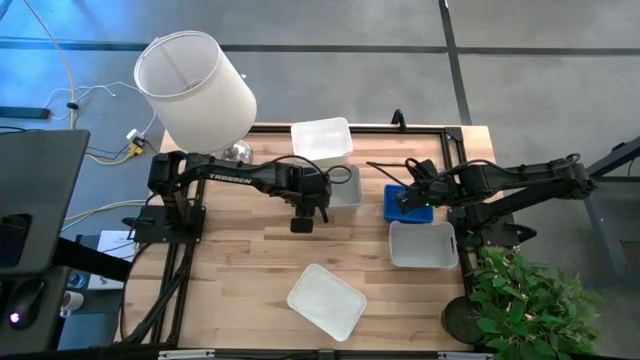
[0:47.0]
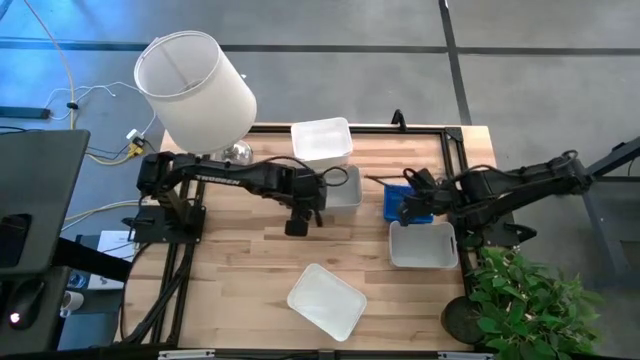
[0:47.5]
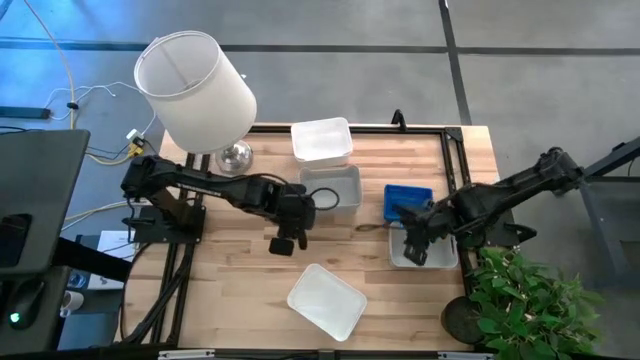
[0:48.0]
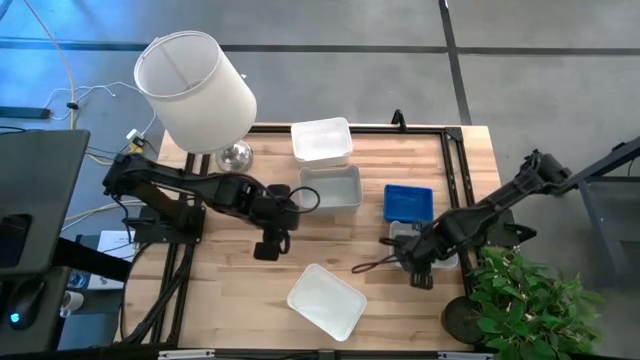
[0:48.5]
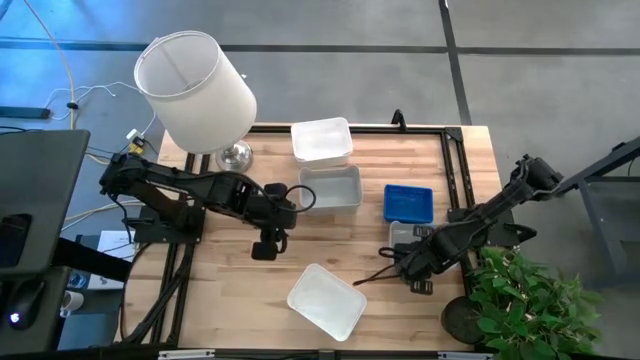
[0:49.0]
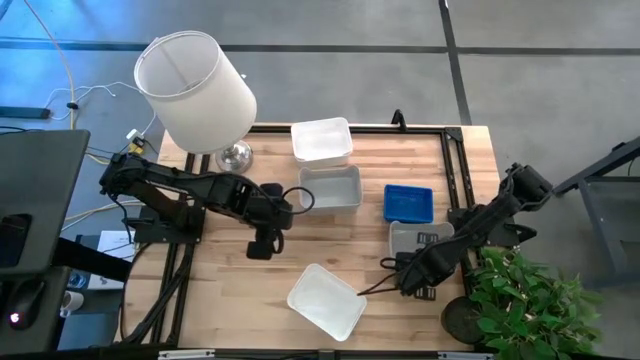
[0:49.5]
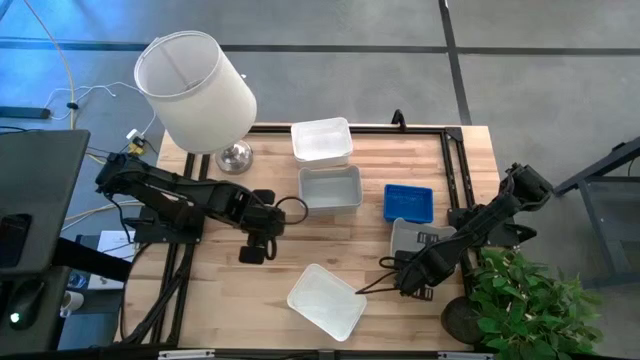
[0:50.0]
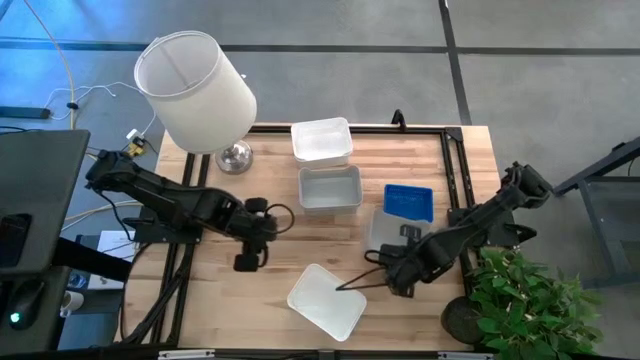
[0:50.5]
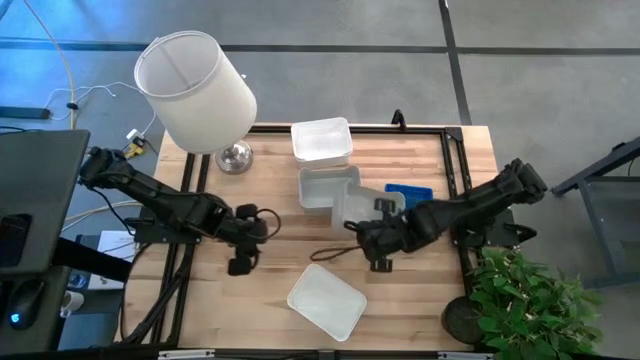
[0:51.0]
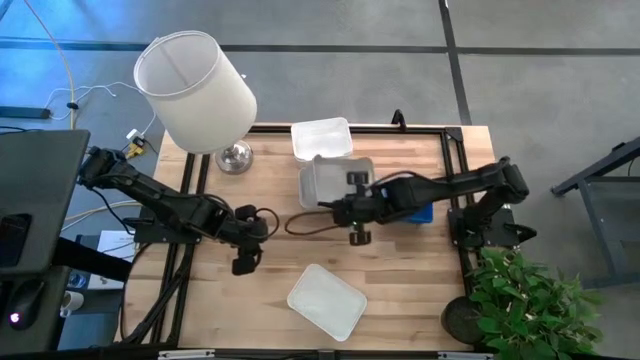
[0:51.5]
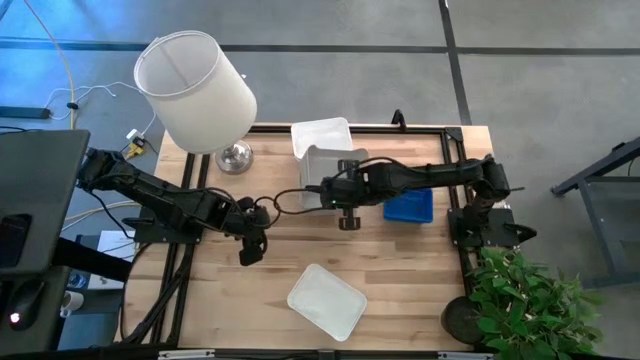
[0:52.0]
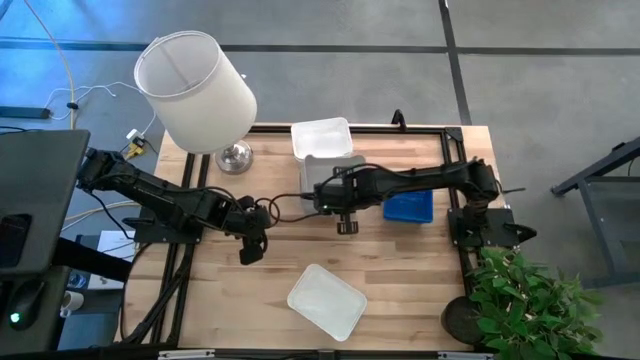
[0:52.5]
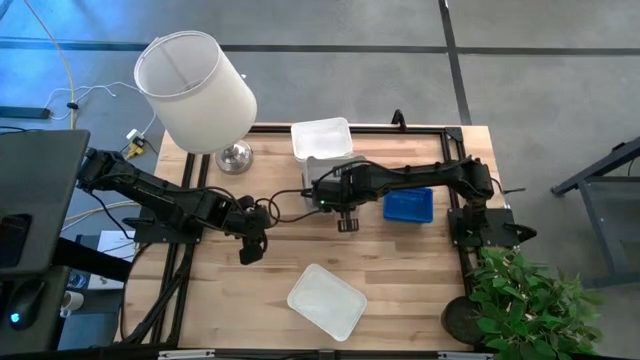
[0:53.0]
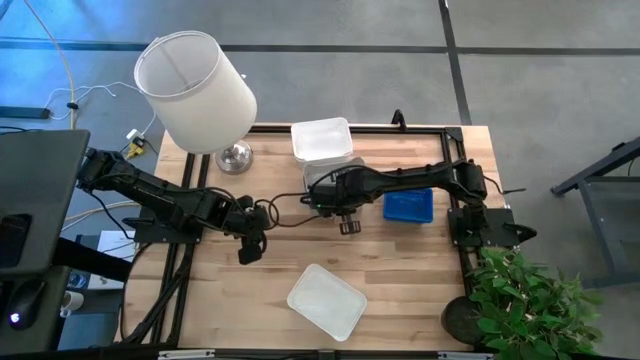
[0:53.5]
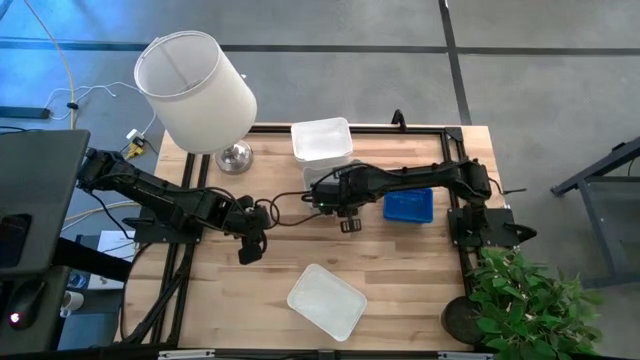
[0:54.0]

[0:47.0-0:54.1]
Stack the bottom gray bin into the top gray bin

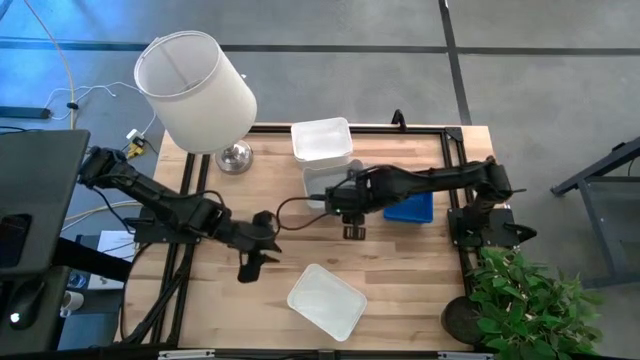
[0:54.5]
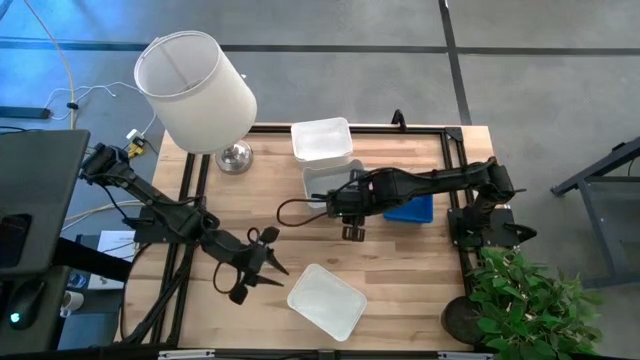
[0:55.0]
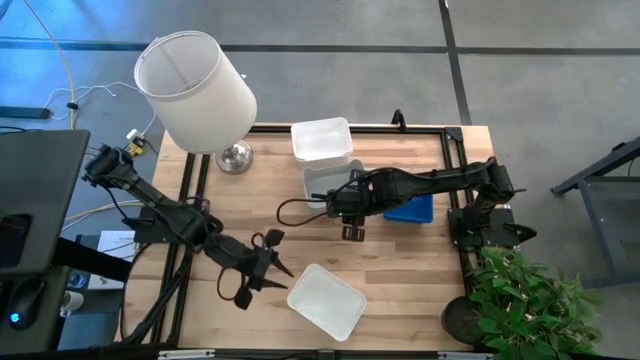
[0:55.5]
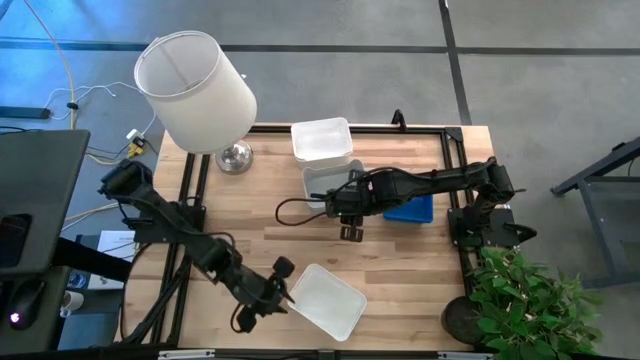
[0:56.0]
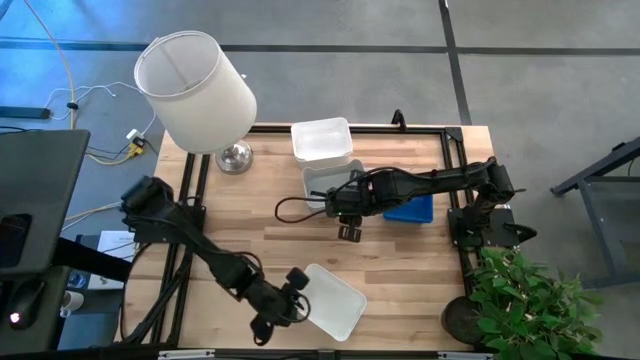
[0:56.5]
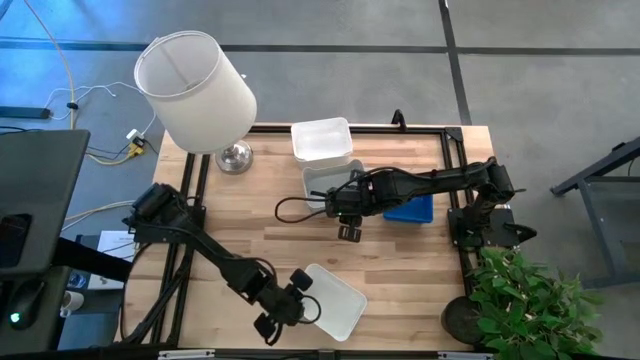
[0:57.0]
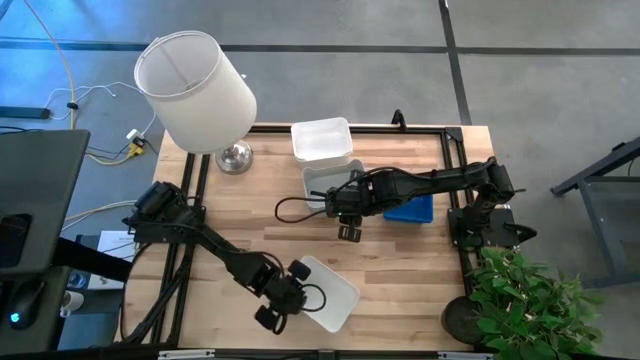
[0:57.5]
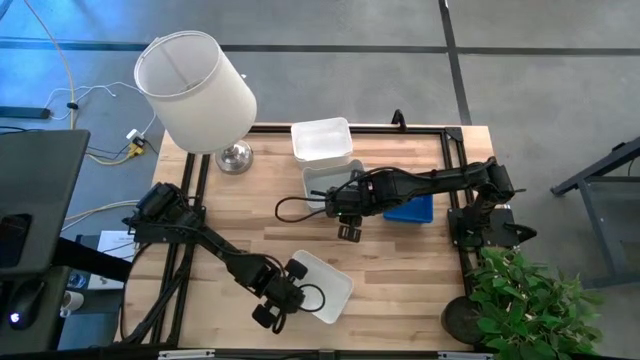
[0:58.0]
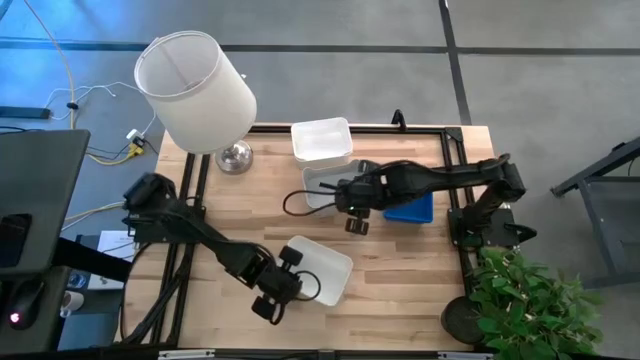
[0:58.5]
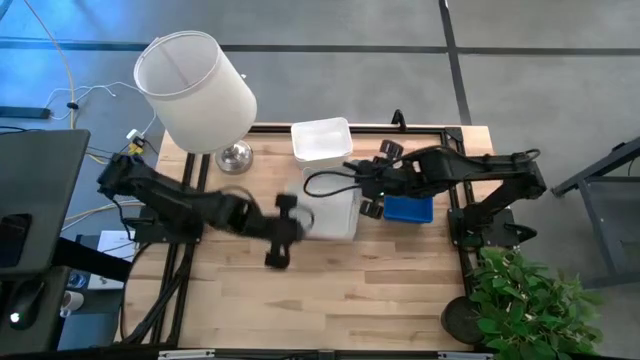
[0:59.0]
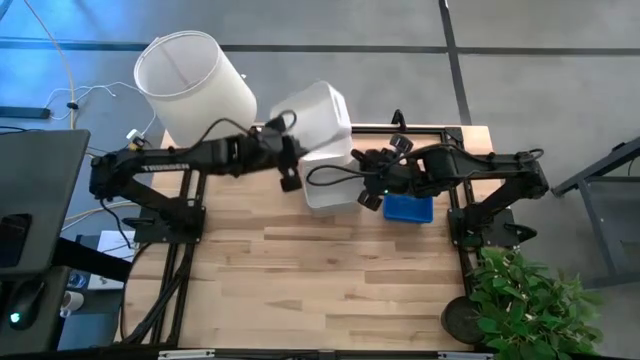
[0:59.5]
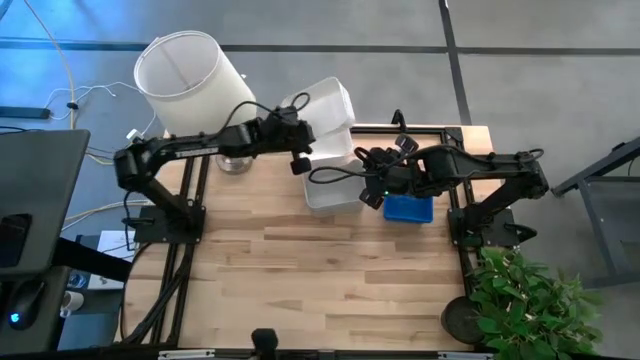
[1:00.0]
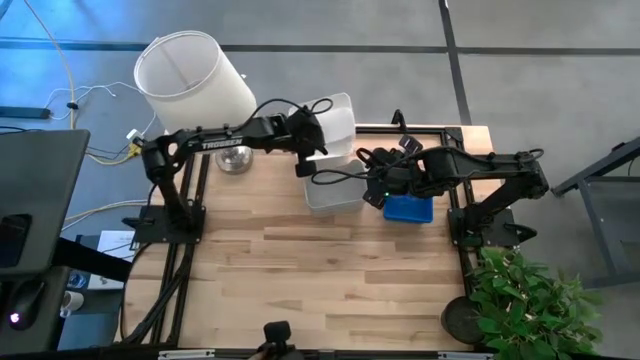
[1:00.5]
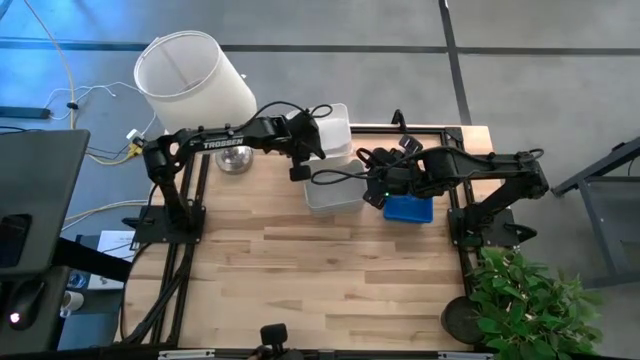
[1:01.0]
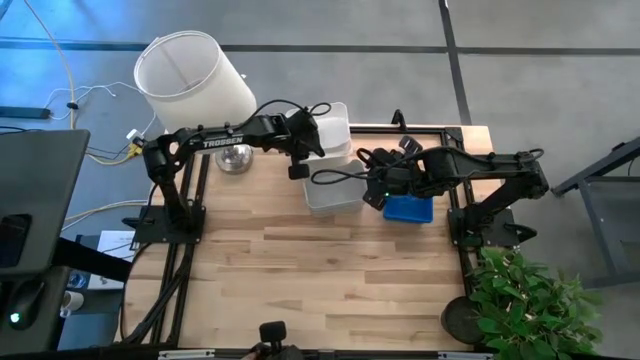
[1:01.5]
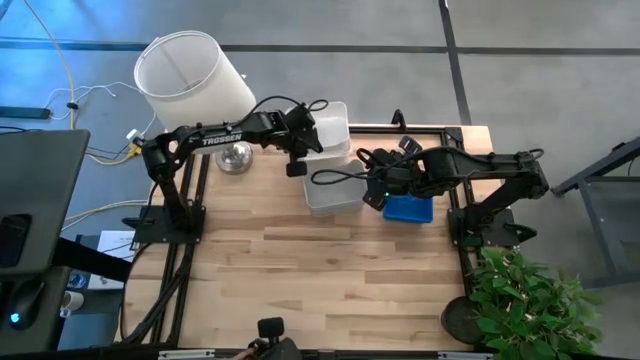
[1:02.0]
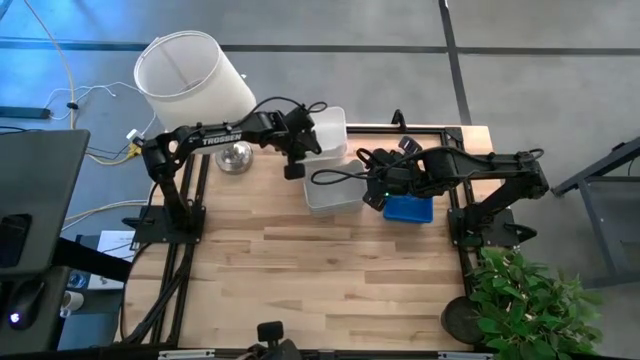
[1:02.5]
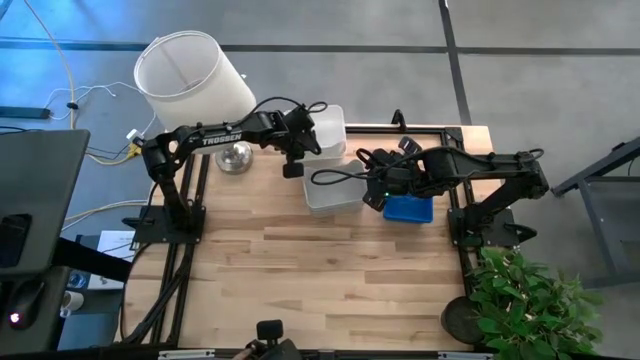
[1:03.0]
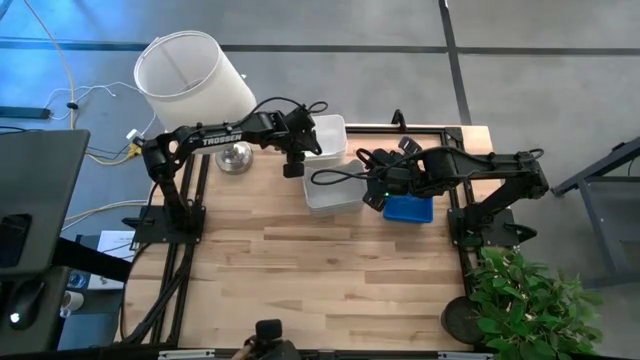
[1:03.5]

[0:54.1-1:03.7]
Stack the bottom white bin into the top white bin

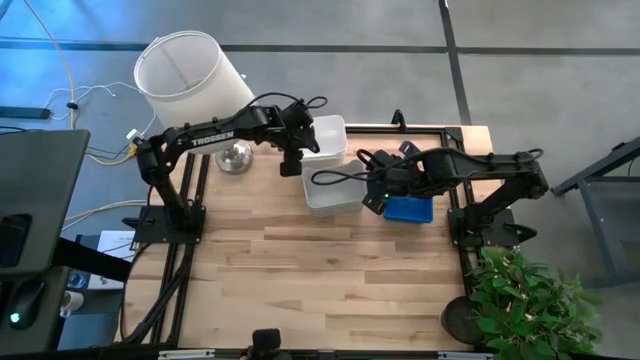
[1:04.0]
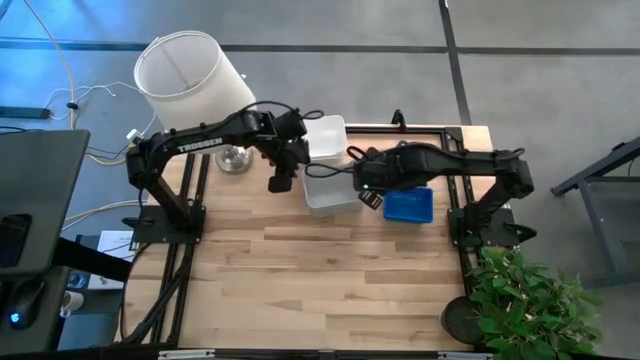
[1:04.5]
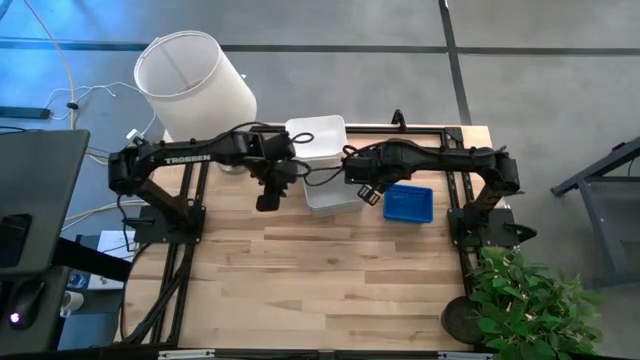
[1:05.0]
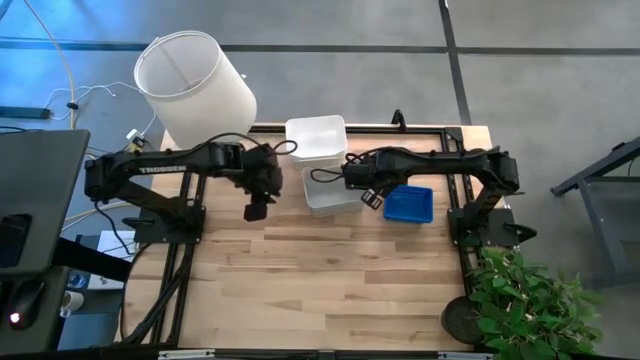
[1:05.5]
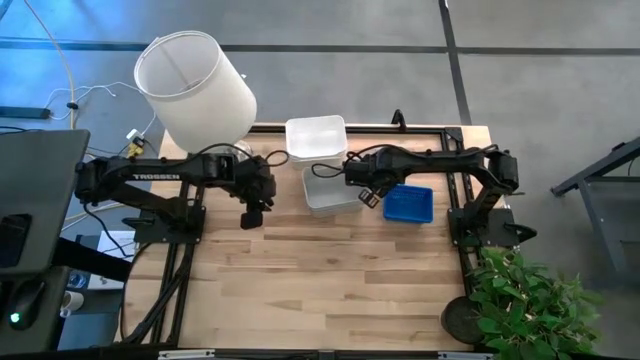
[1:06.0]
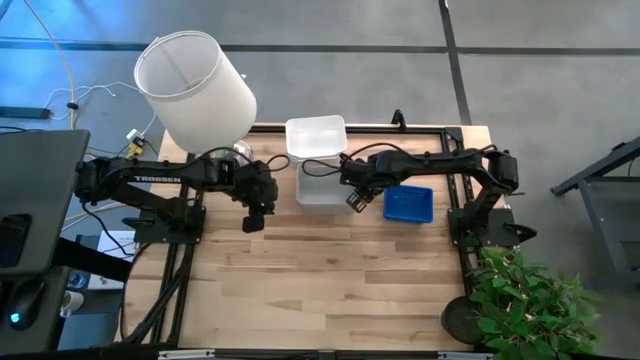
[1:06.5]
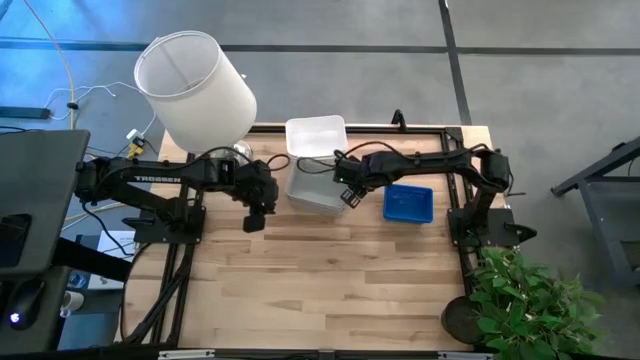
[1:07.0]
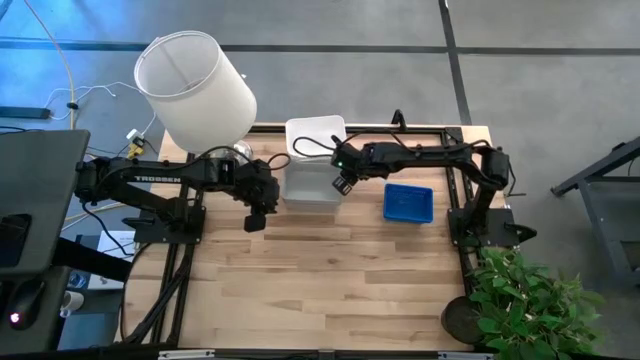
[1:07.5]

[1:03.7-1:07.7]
Adjust the gray bin
